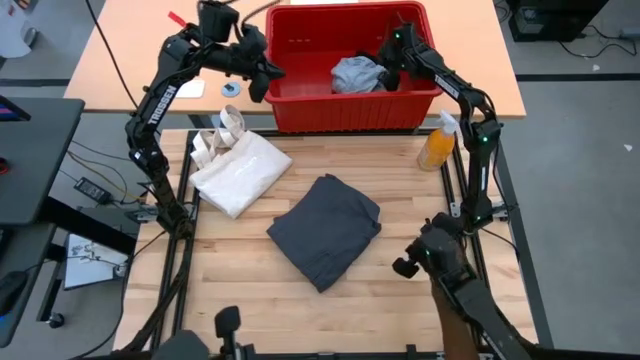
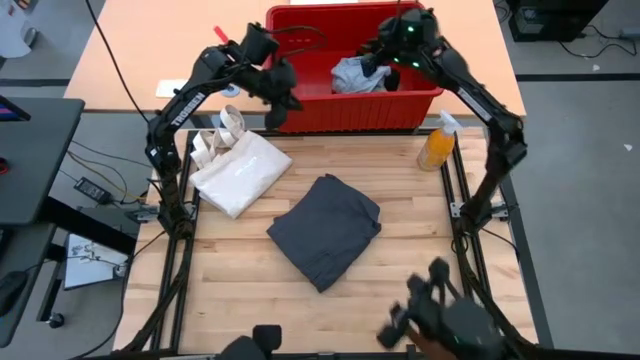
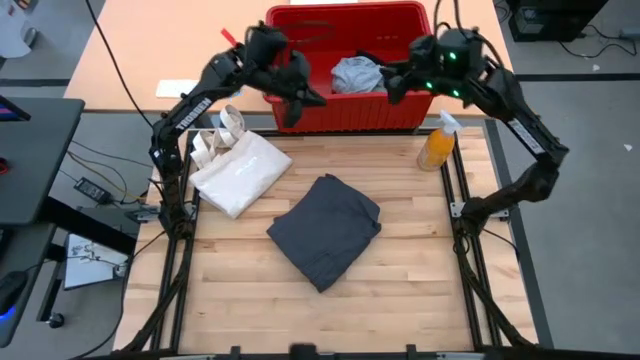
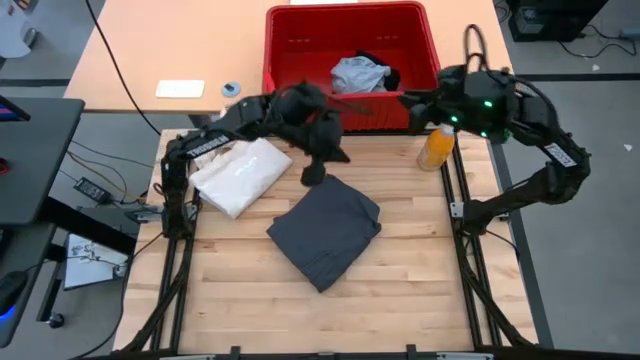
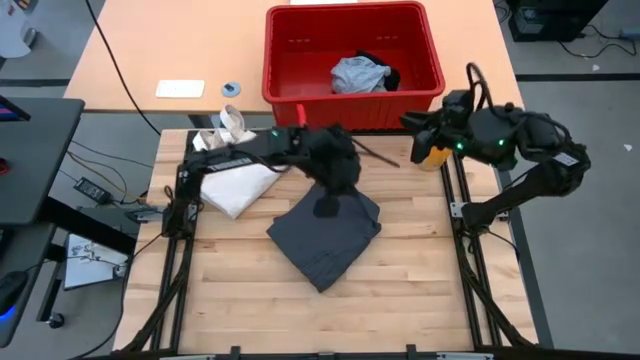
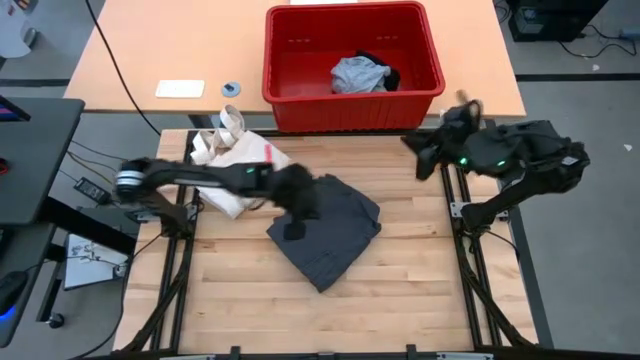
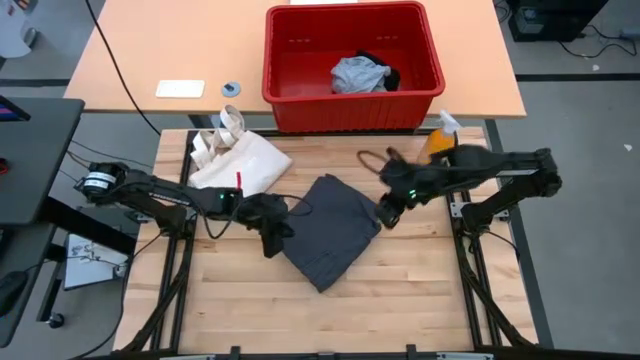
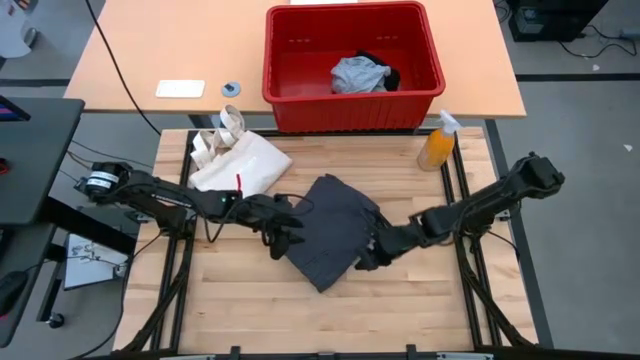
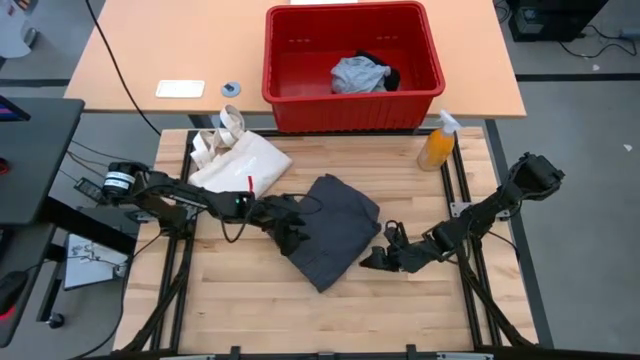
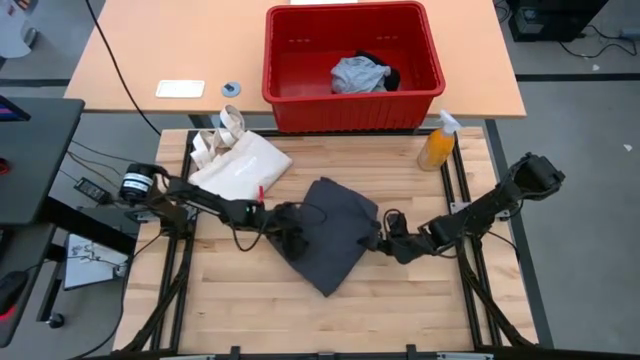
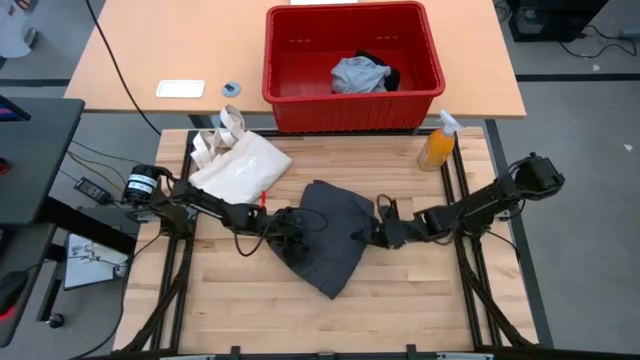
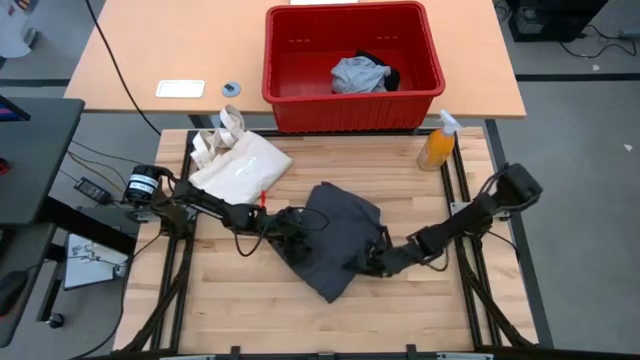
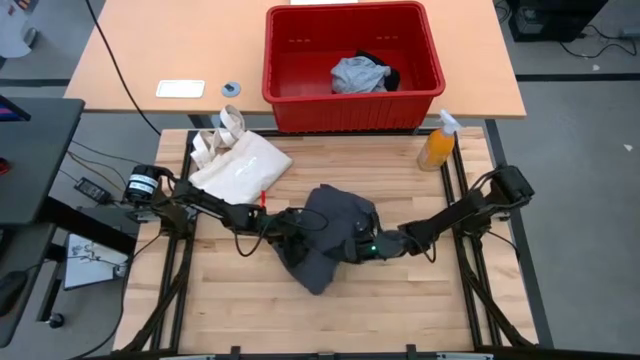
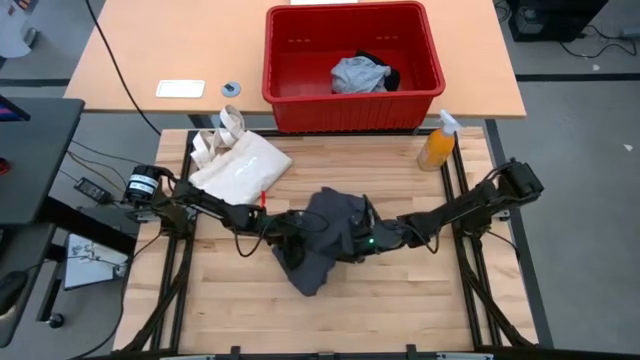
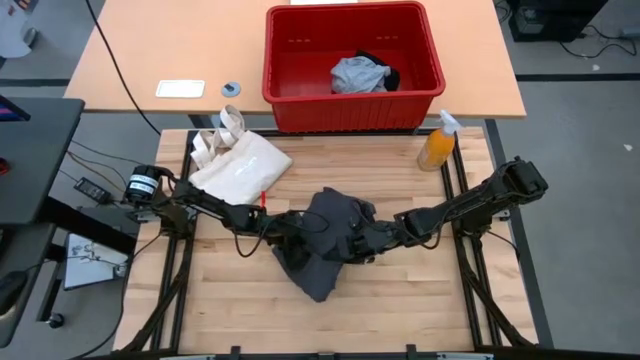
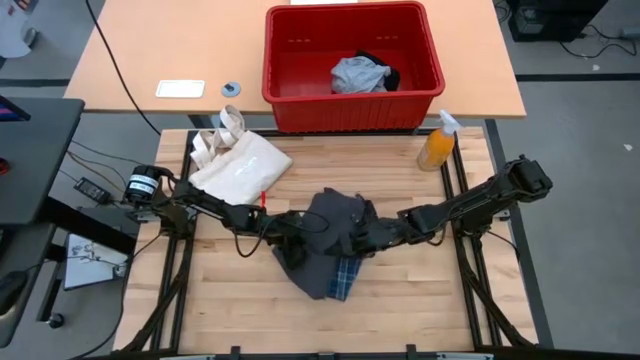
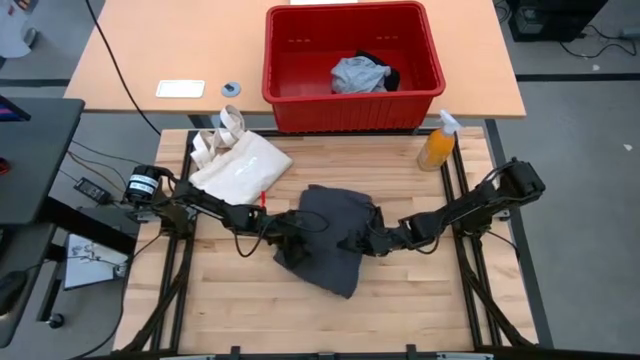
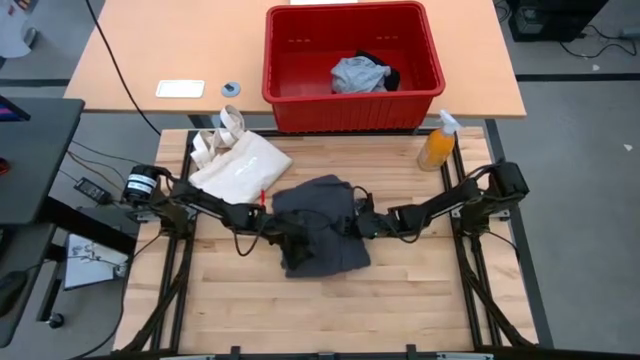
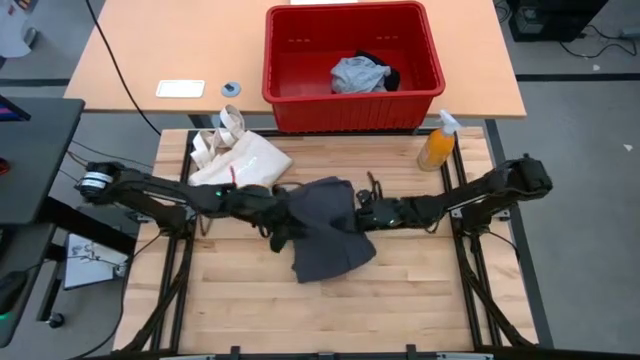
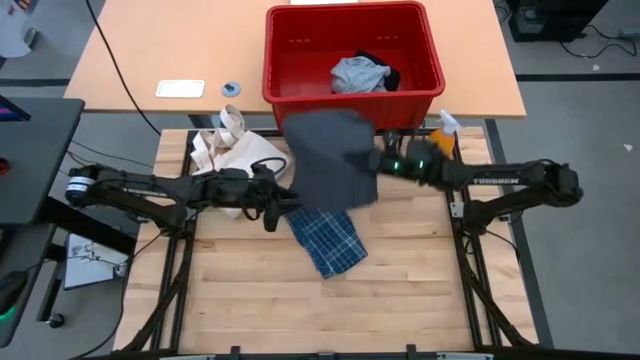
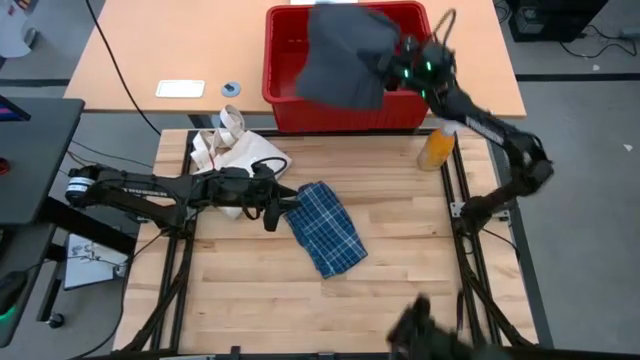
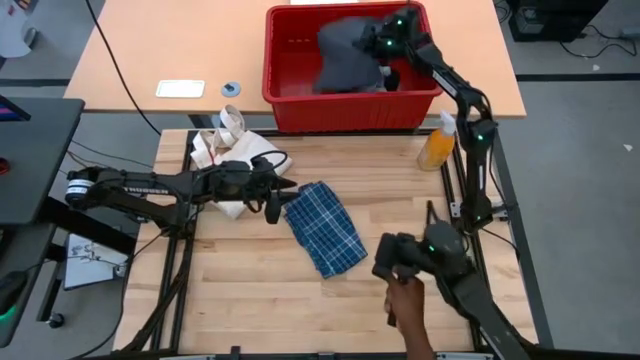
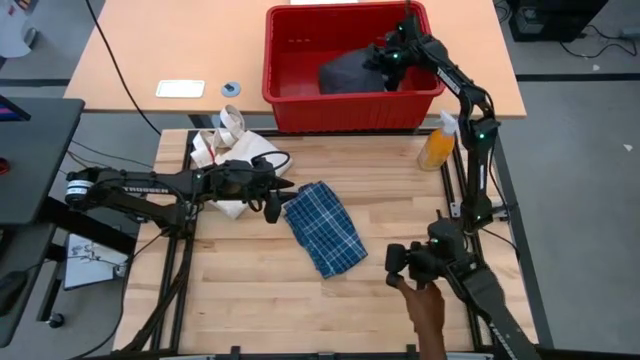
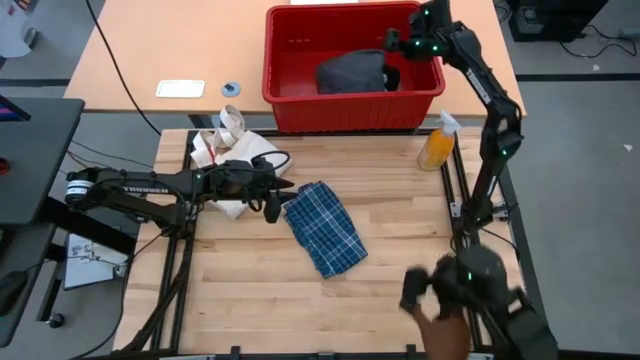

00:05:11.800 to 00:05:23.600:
Task: Fold Laundry from Bin
Put the dark gray shorts into the red organizer bin

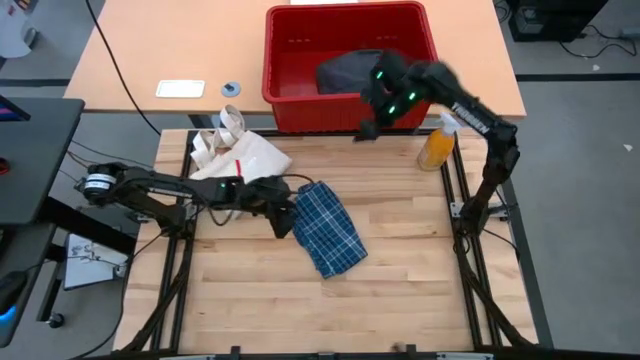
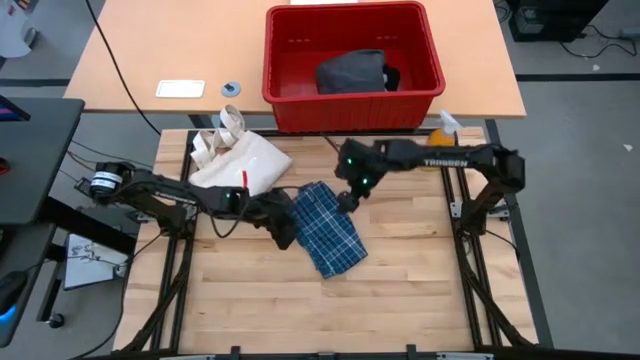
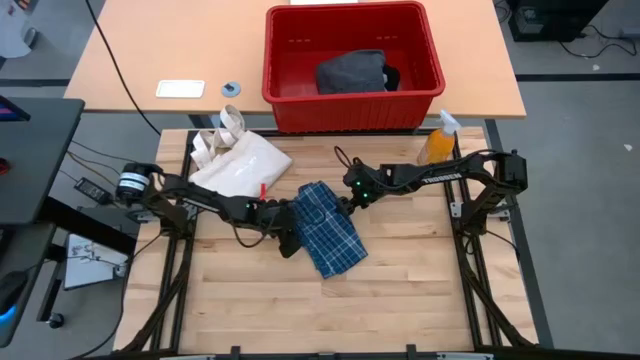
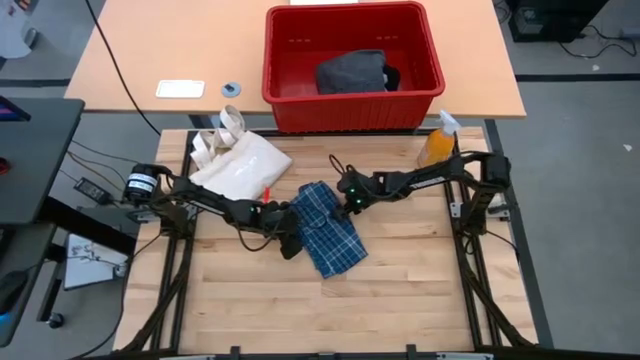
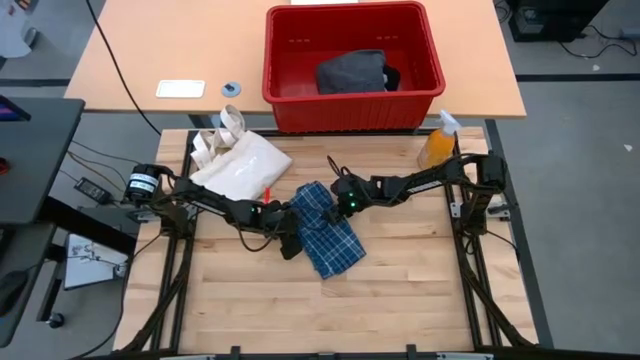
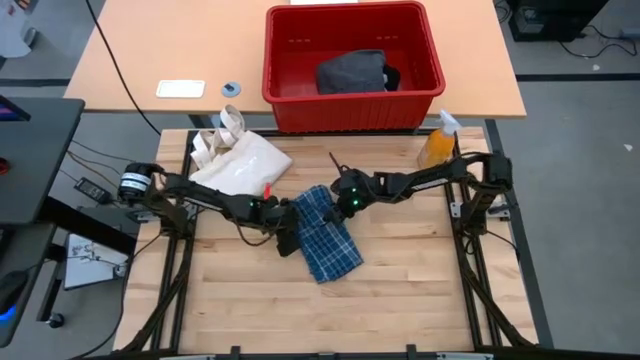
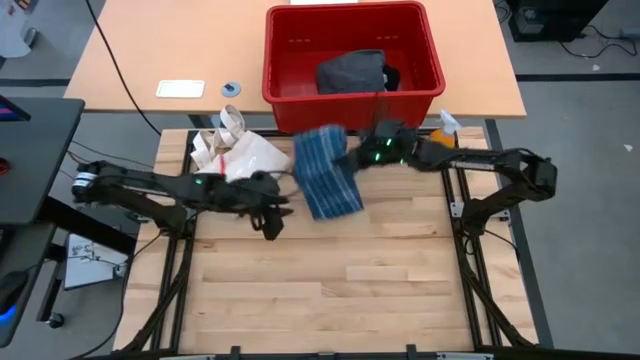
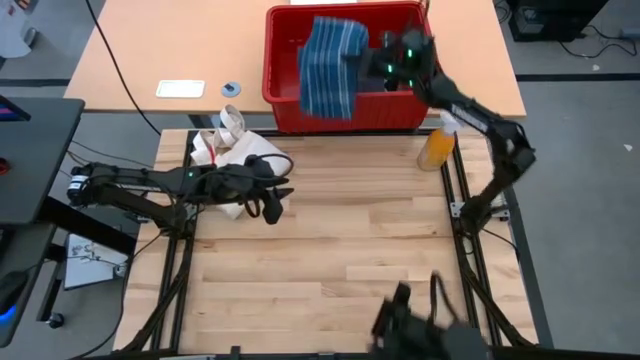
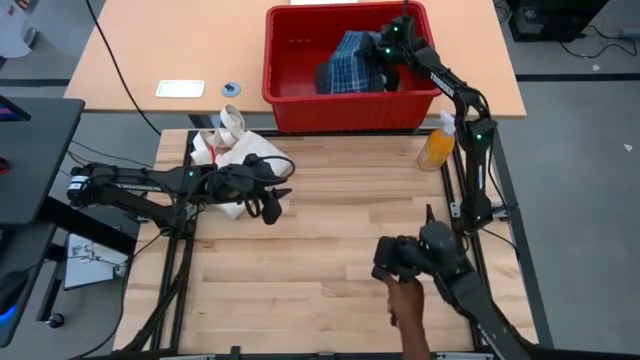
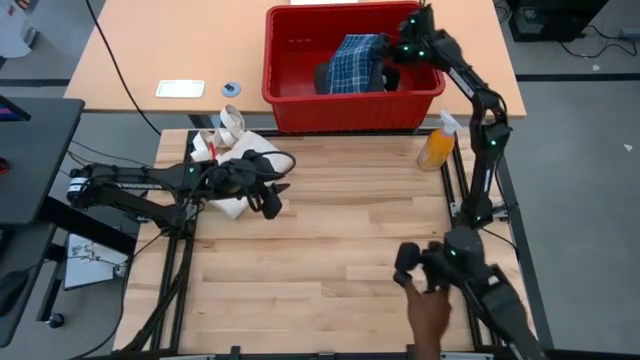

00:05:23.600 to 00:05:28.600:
Put the blue shorts into the red organizer bin

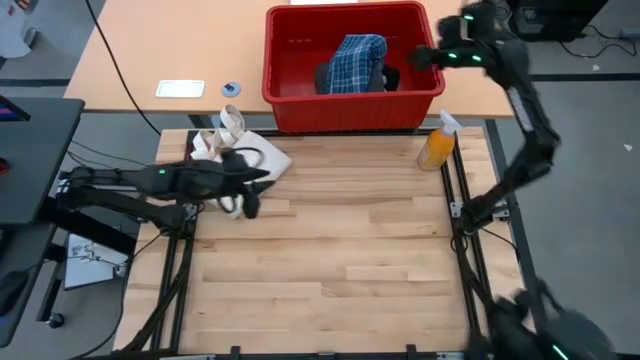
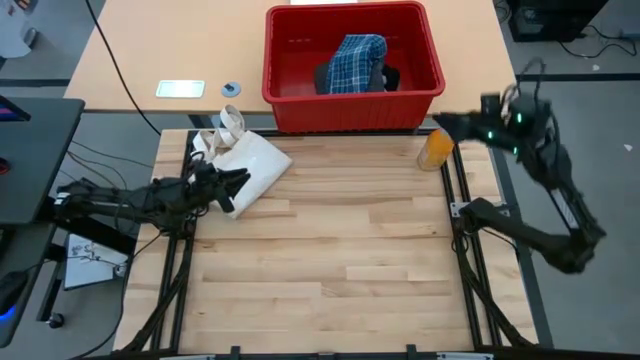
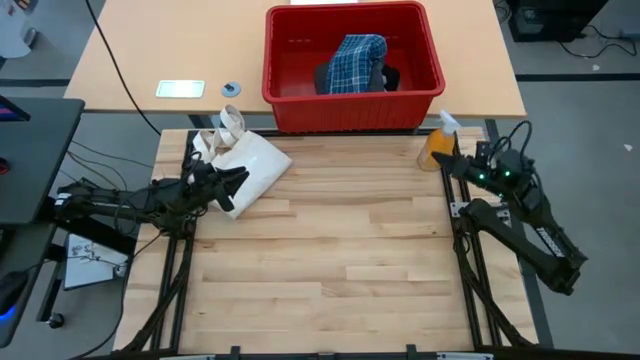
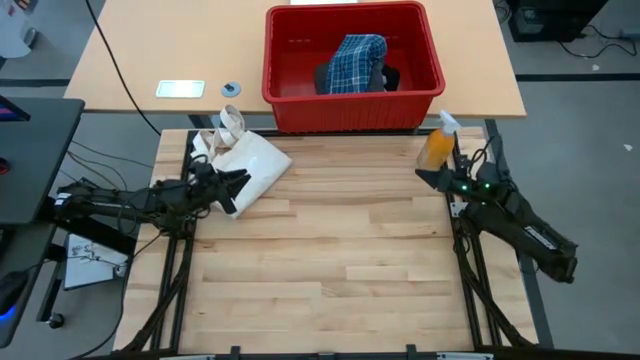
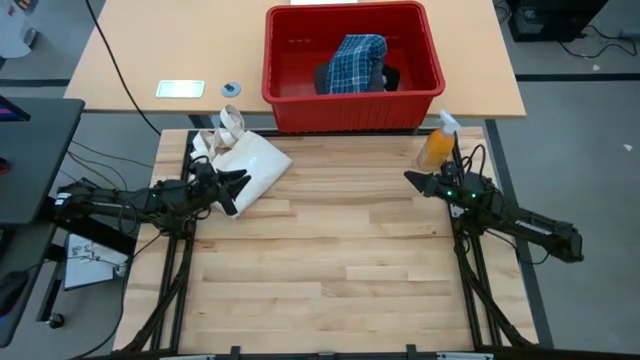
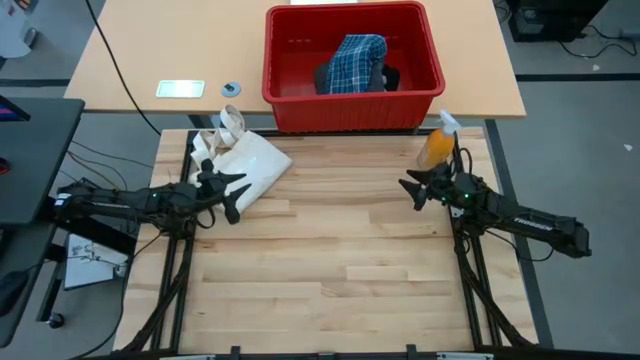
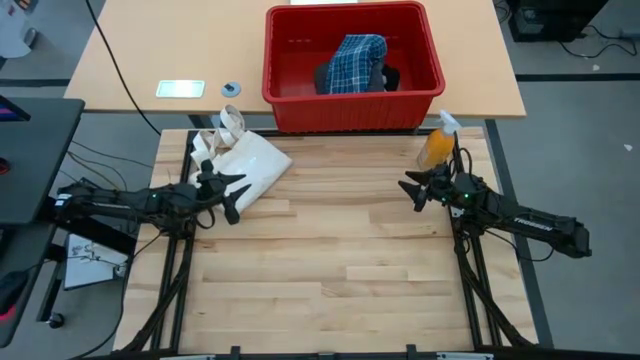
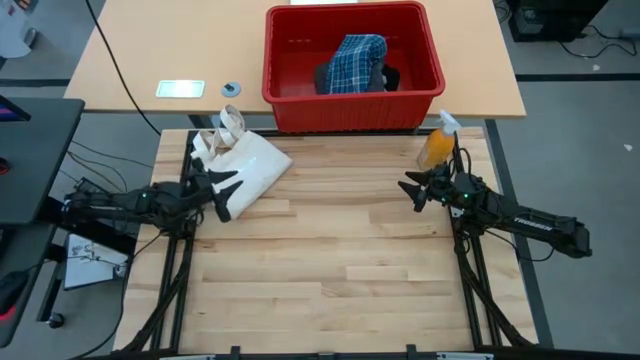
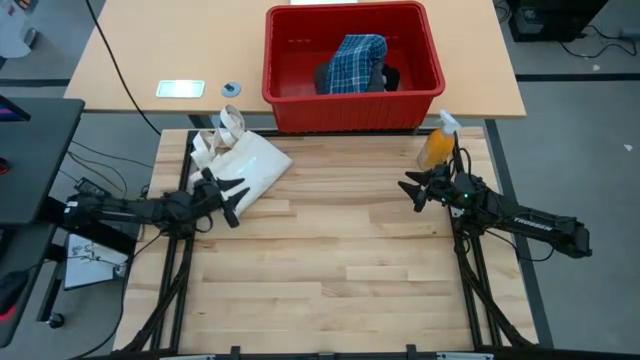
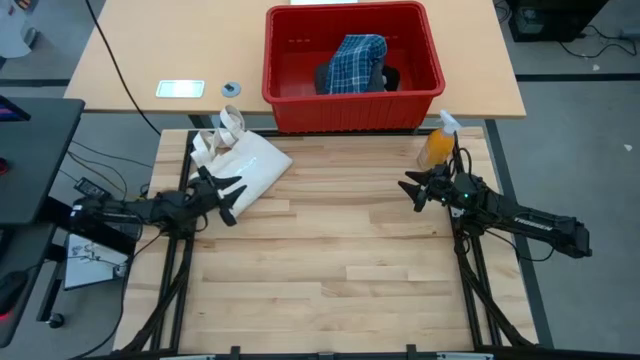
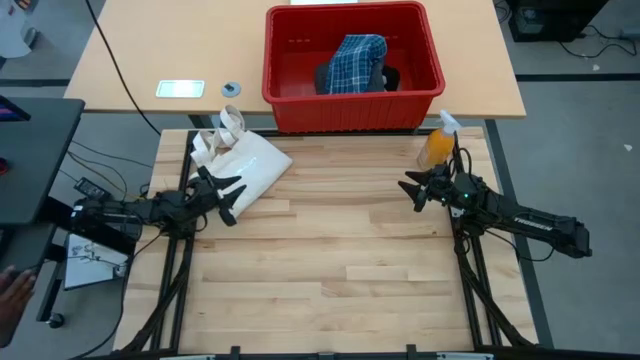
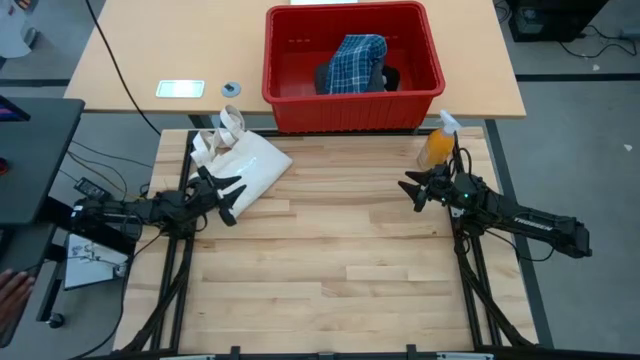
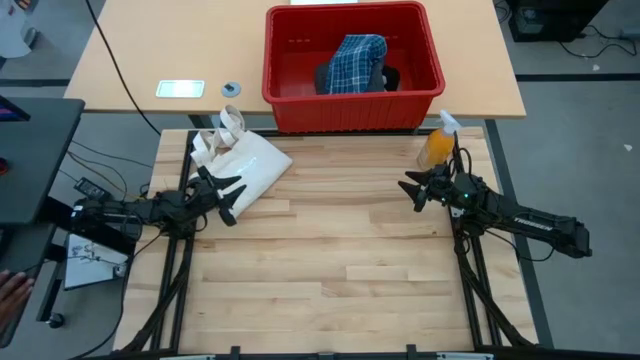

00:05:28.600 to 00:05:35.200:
Return to Home Position
